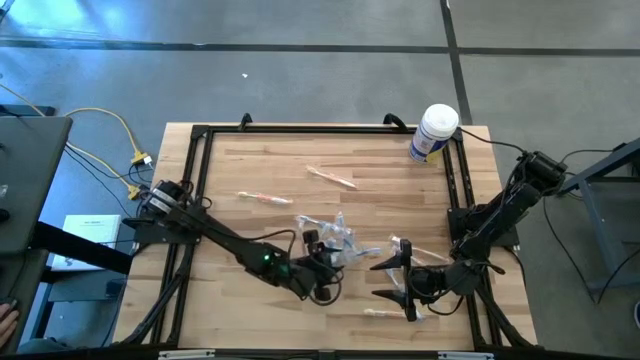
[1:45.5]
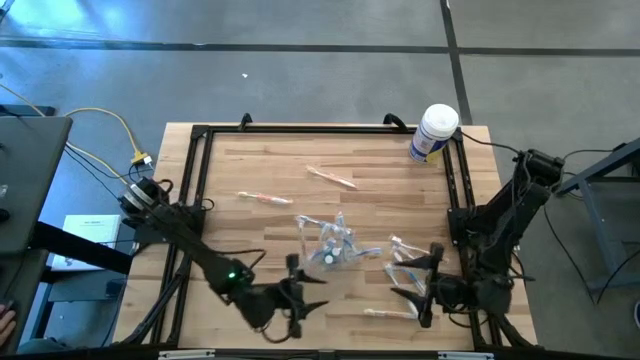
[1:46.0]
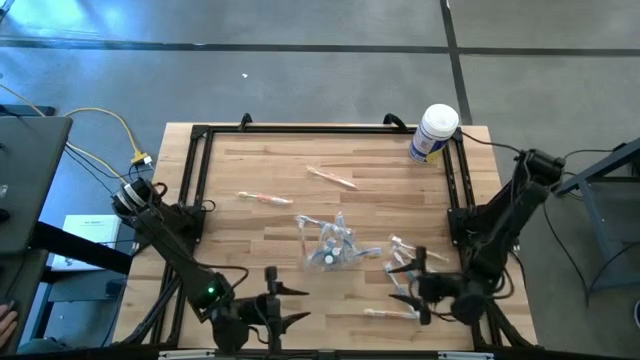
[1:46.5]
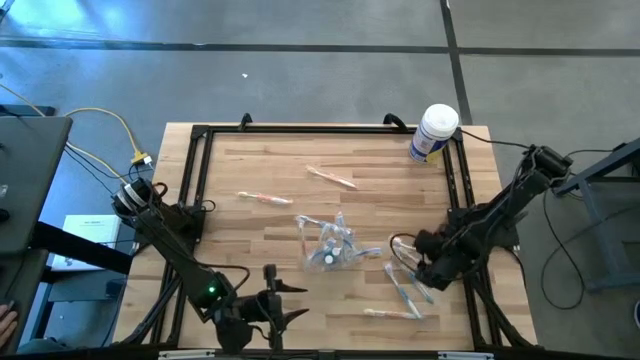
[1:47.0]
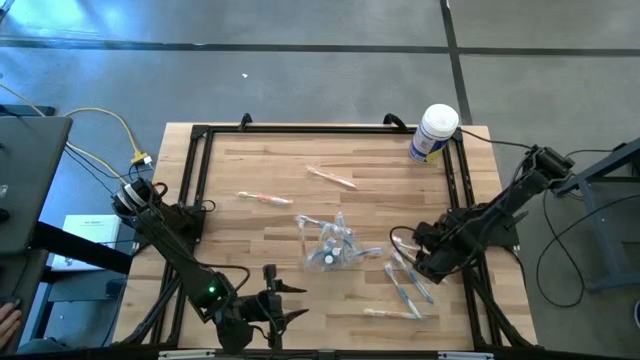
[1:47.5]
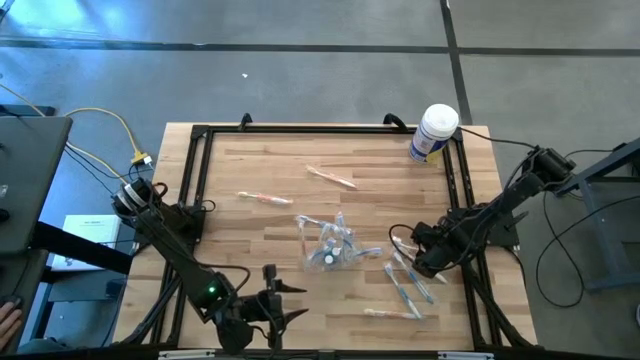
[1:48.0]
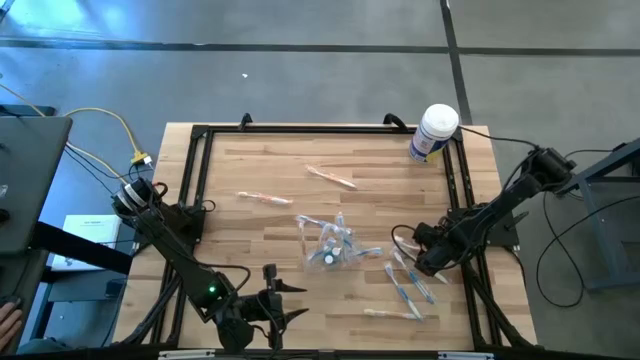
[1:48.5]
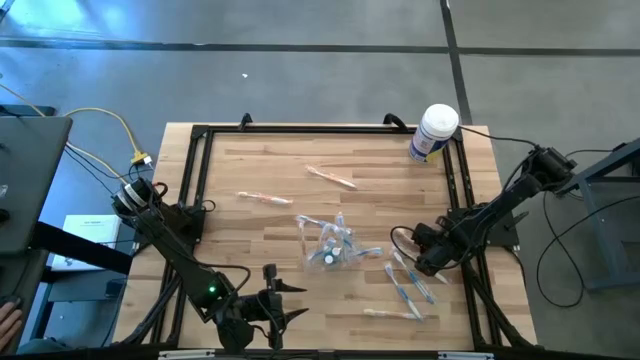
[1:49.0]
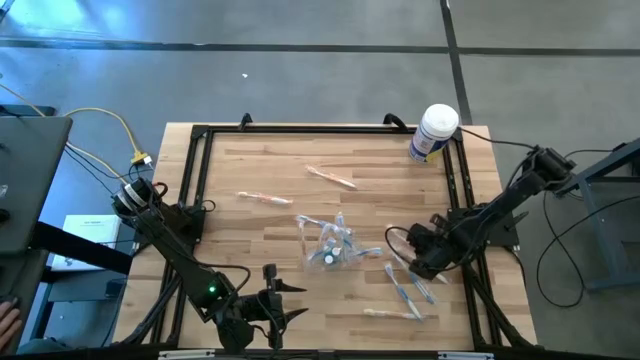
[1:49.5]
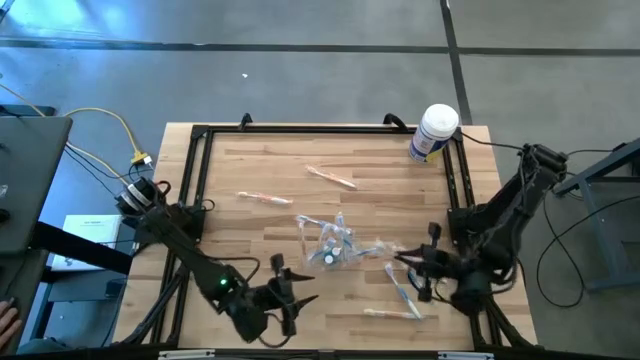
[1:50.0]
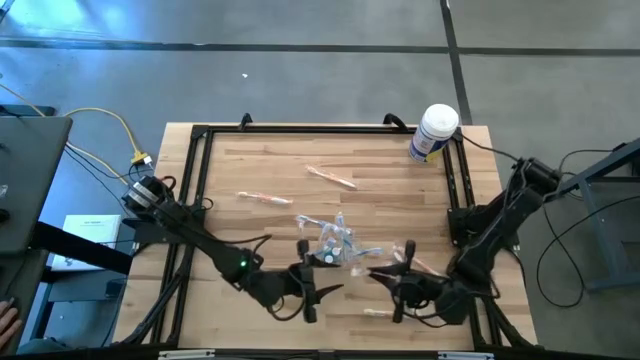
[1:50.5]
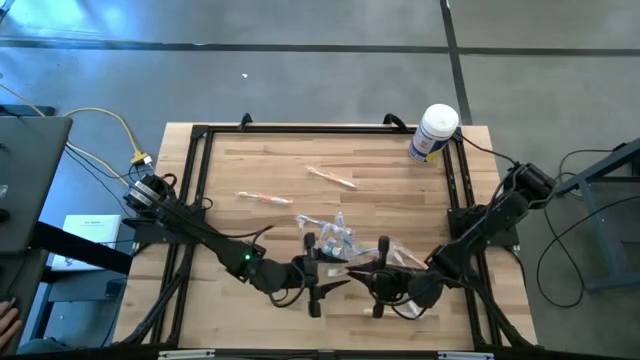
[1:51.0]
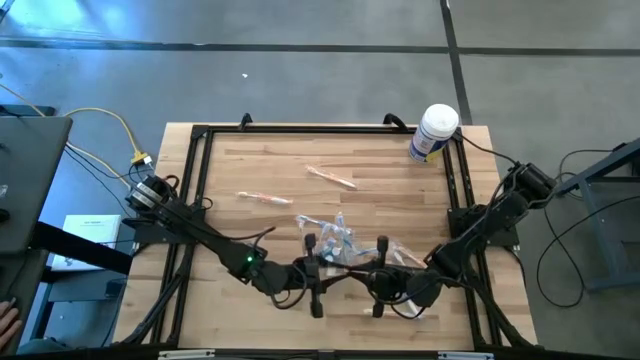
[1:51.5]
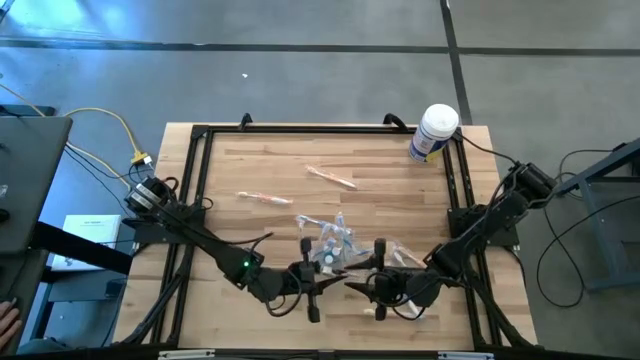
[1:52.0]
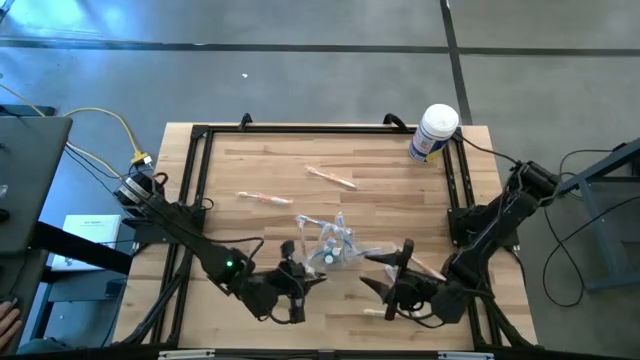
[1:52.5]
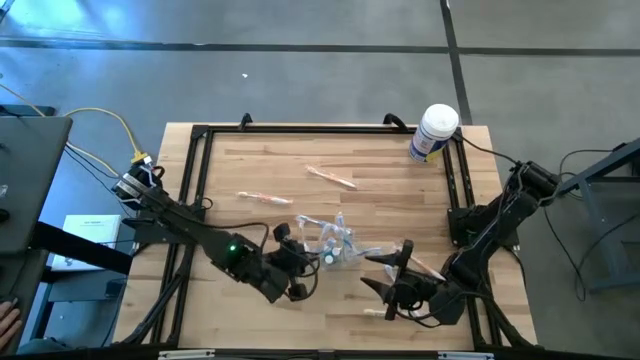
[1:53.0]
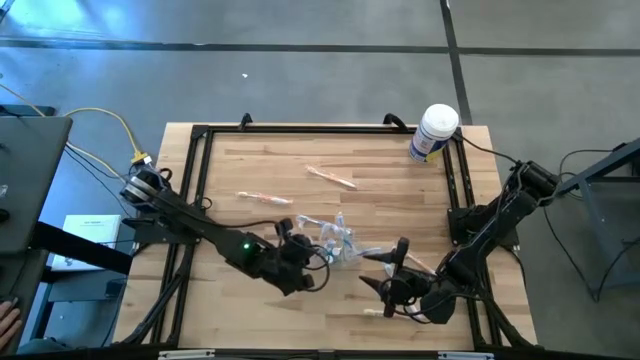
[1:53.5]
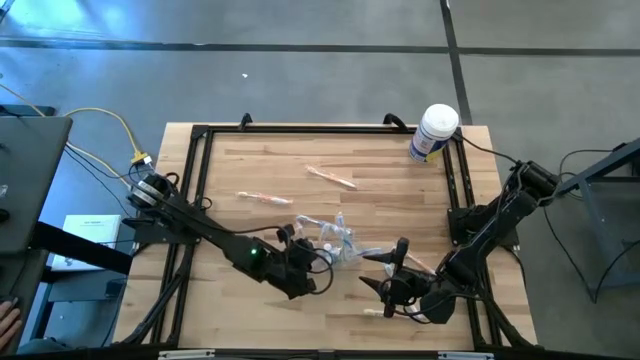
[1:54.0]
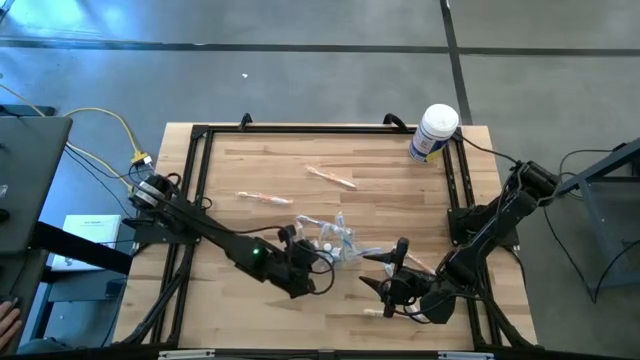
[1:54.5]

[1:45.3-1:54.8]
Task: Pick & Place toothbrushing station
Put the orange toothbrush into the transparent organizer

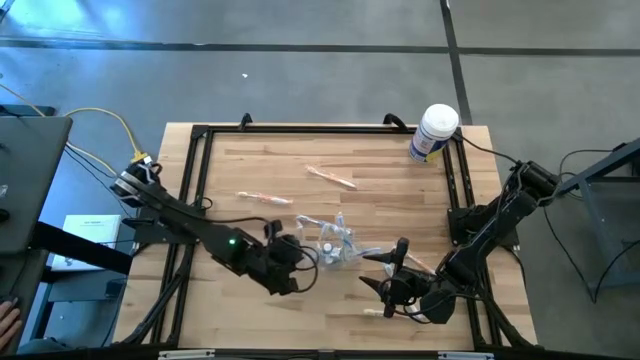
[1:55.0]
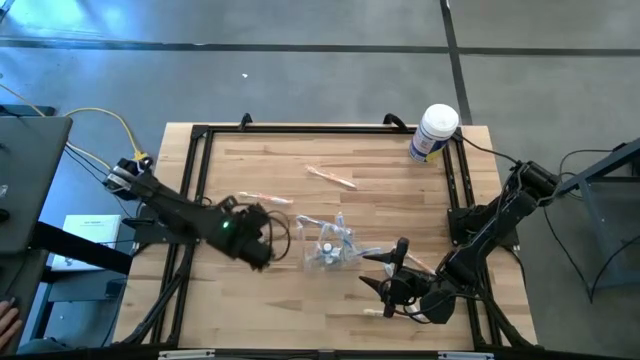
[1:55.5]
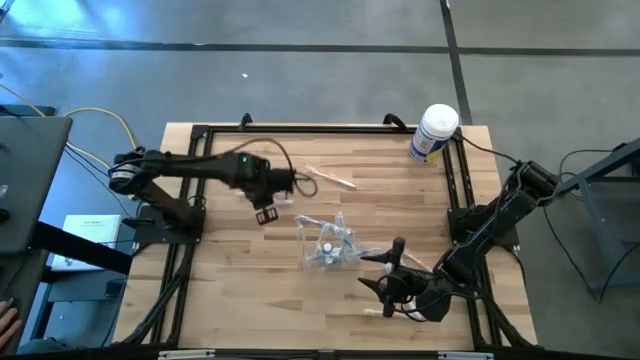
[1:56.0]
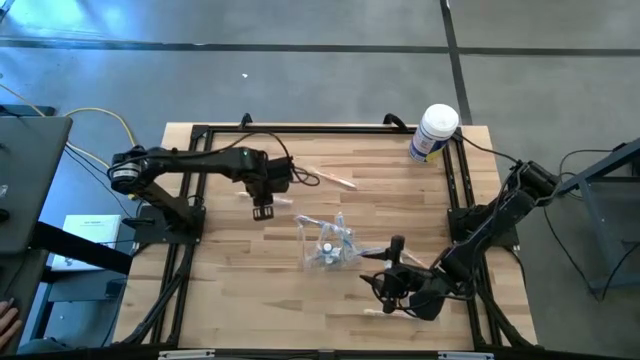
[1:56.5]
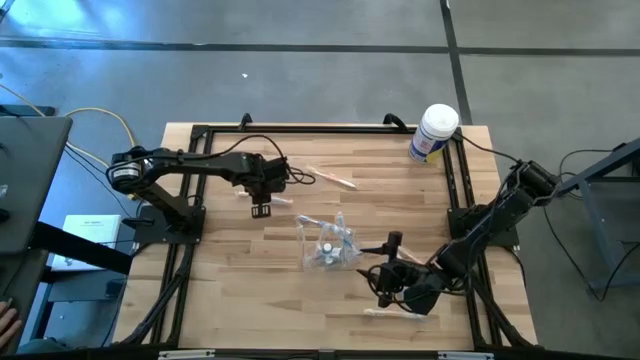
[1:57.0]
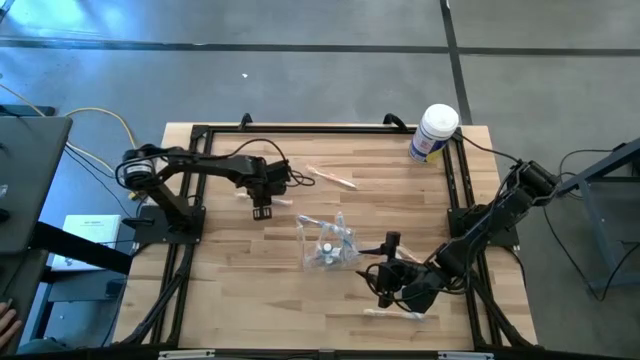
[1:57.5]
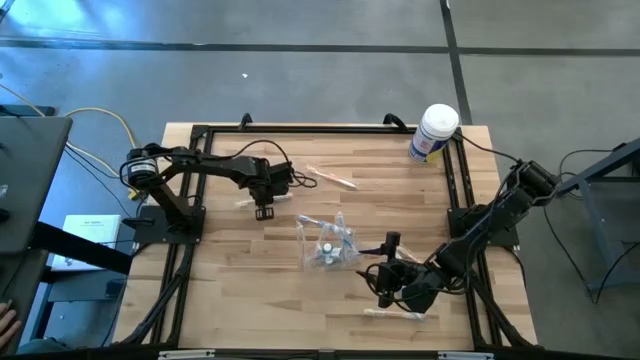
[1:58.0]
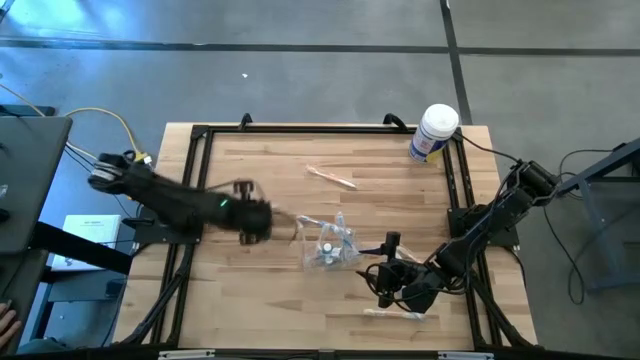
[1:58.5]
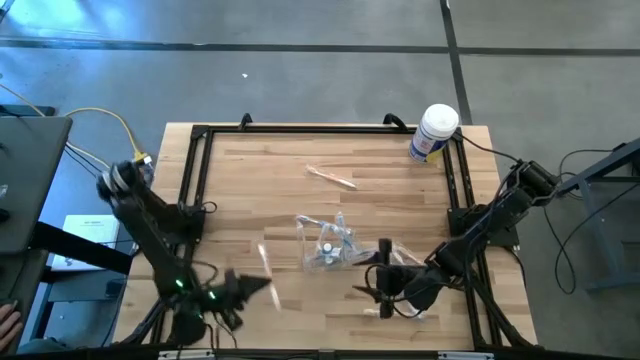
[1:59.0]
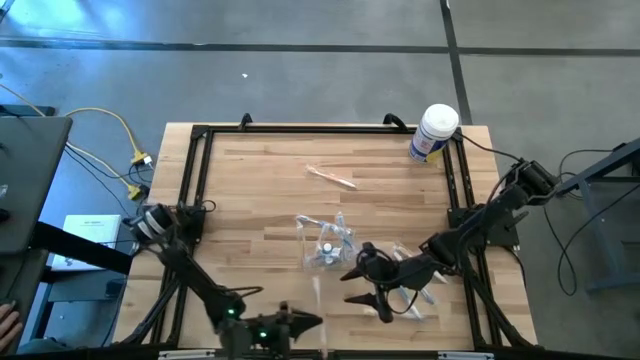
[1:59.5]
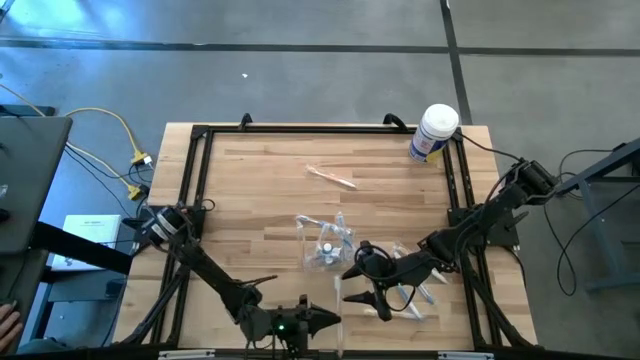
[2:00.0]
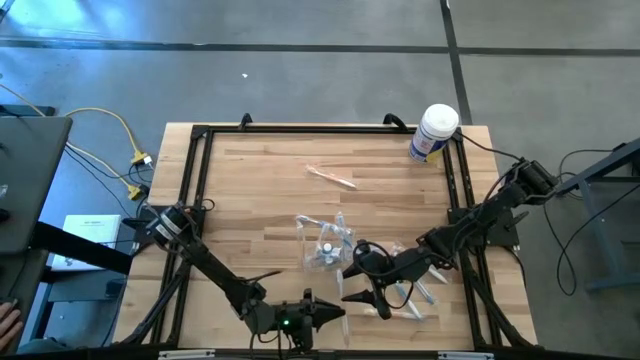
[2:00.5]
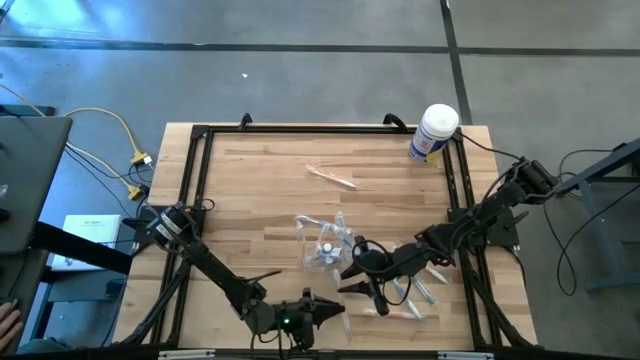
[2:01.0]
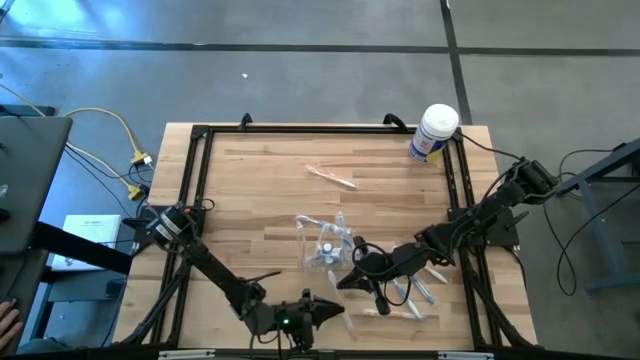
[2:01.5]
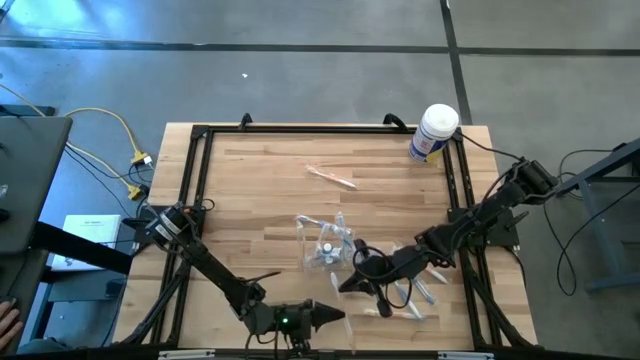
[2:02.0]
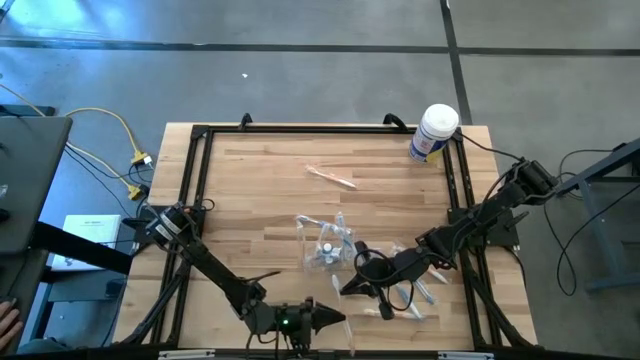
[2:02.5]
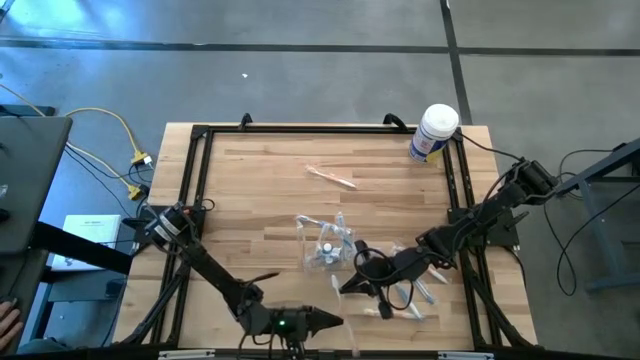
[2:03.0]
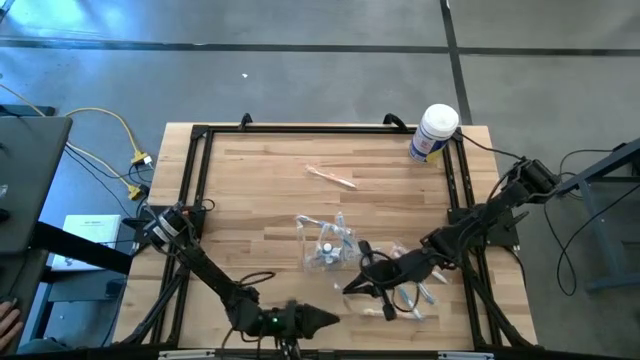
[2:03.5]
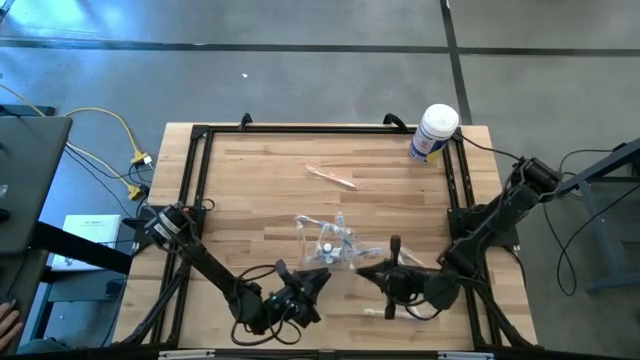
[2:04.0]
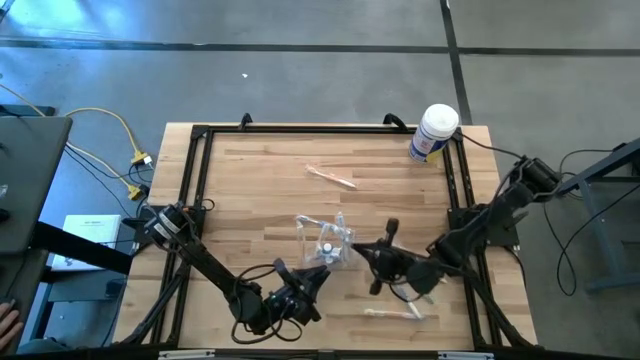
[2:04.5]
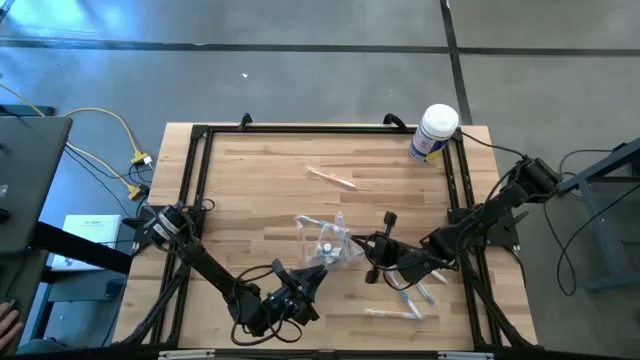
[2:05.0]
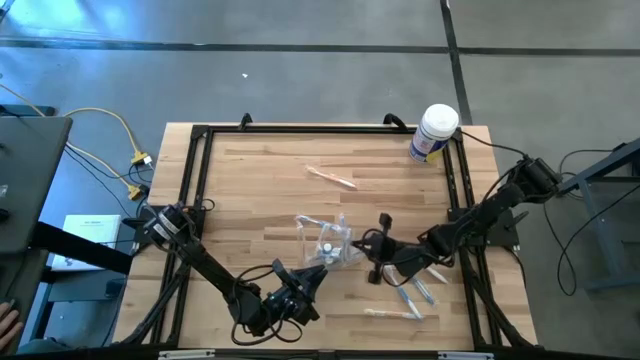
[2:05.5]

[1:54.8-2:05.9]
Put the orange toothbrush into the transparent organizer

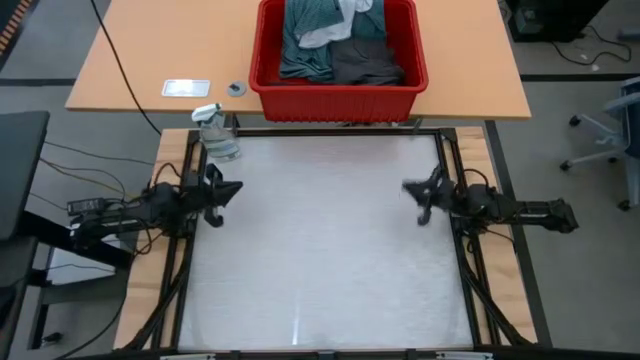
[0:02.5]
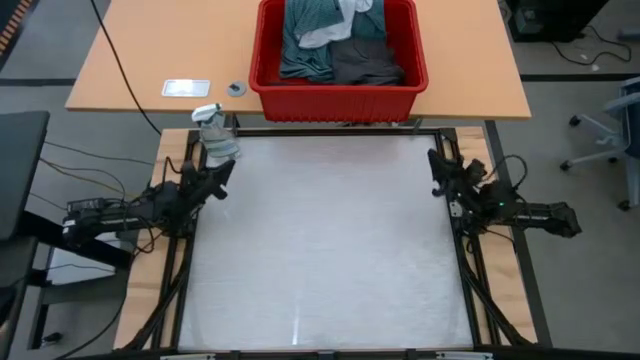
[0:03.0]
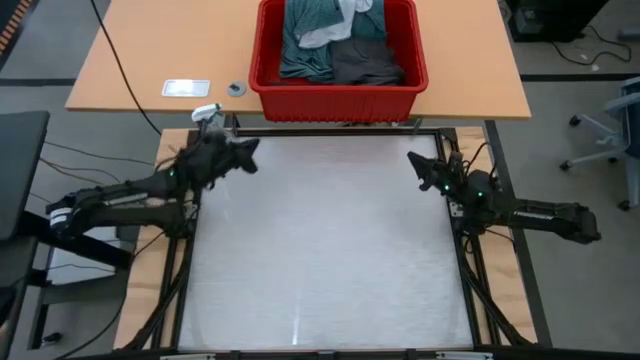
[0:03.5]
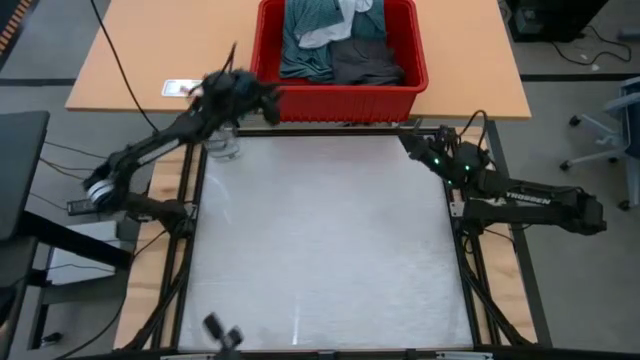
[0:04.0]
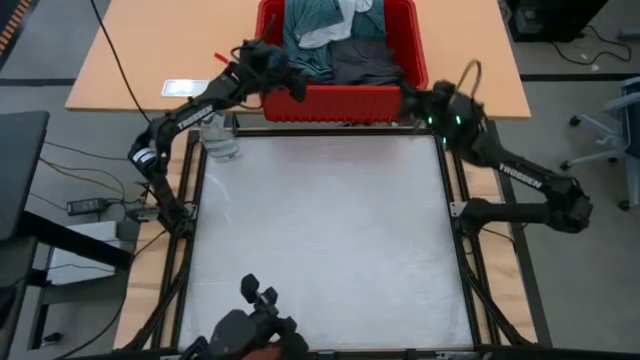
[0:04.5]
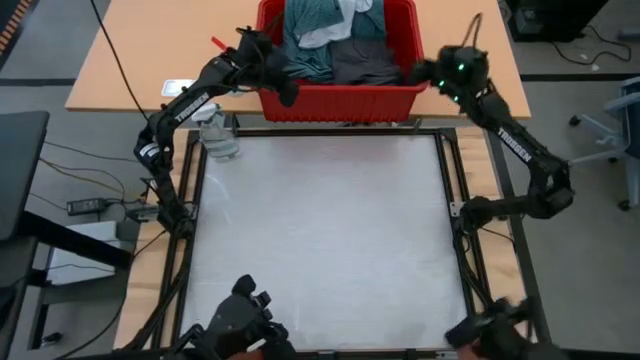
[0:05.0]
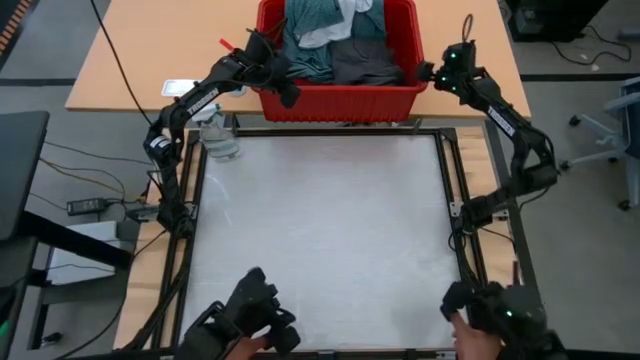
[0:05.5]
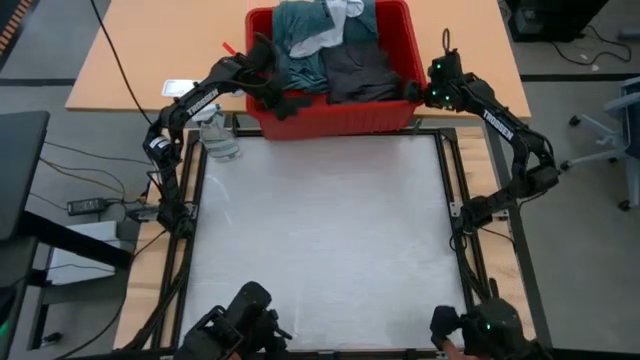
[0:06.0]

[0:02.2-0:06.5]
Task: Fold Laundry from Bin
Adjust the red organizer bin
